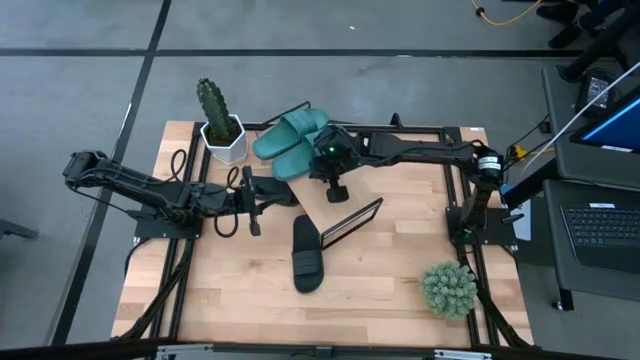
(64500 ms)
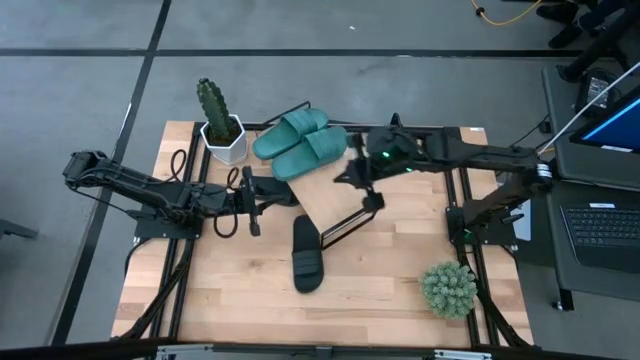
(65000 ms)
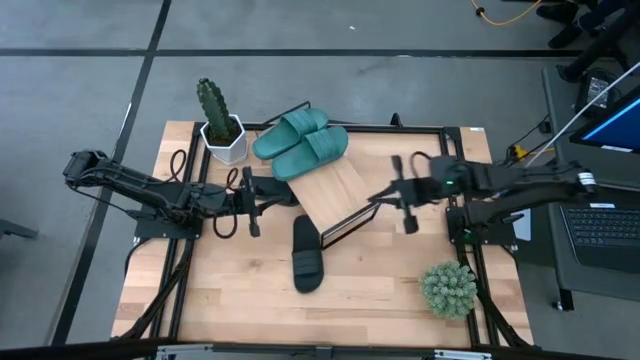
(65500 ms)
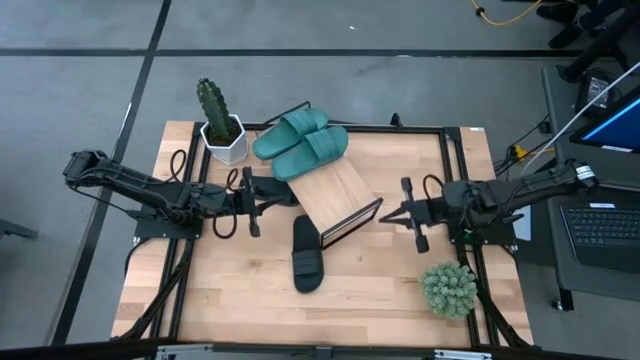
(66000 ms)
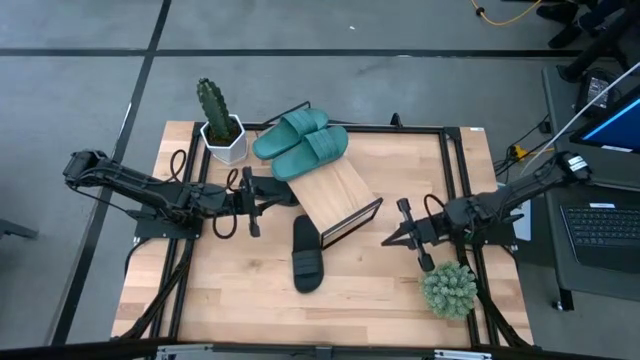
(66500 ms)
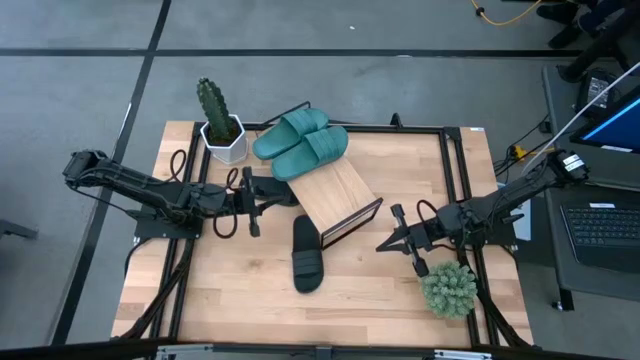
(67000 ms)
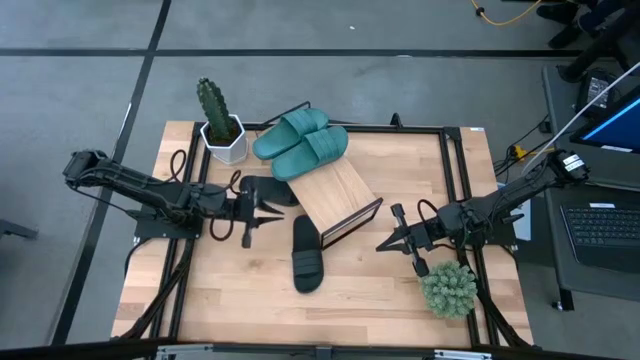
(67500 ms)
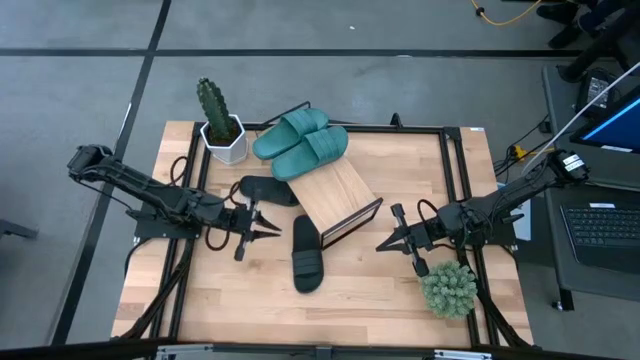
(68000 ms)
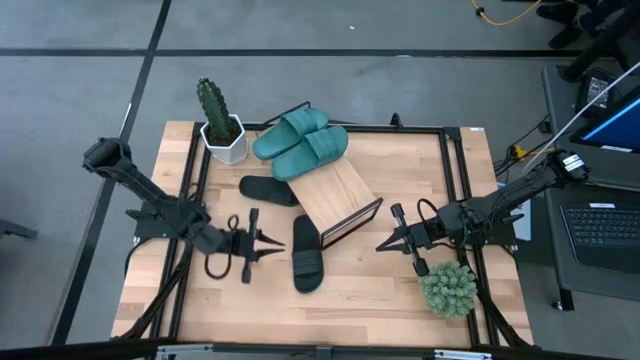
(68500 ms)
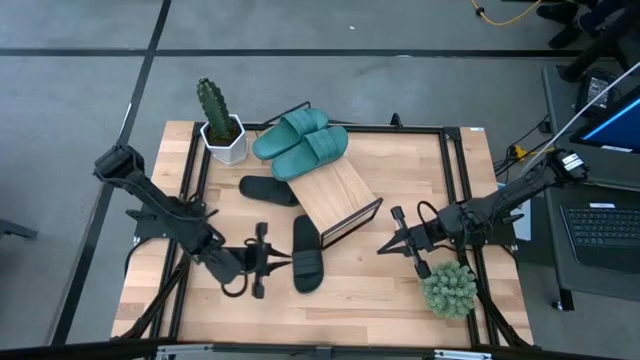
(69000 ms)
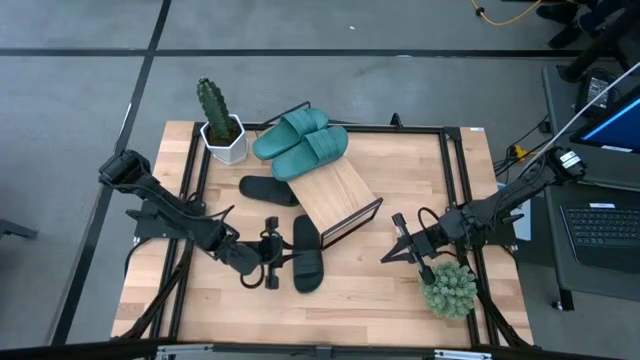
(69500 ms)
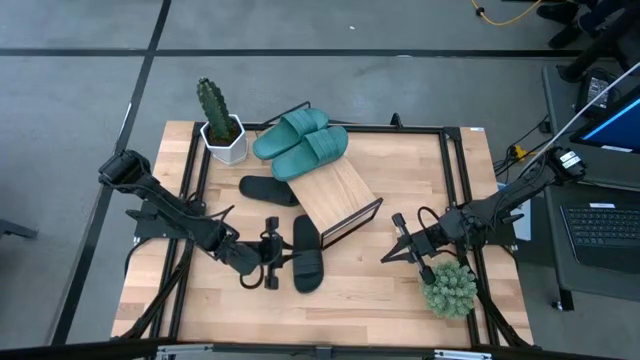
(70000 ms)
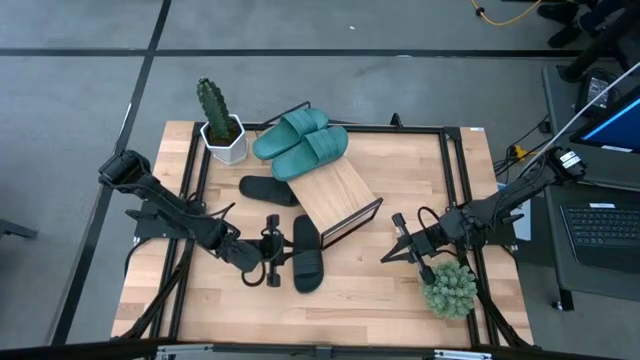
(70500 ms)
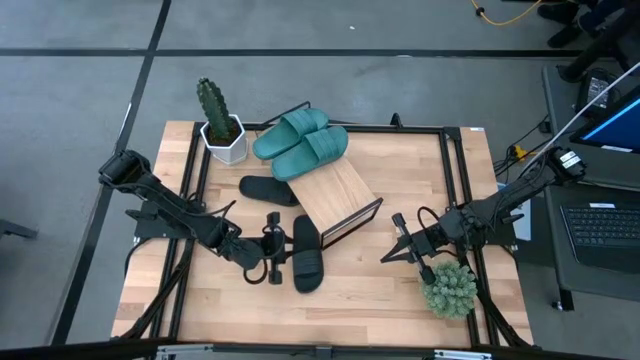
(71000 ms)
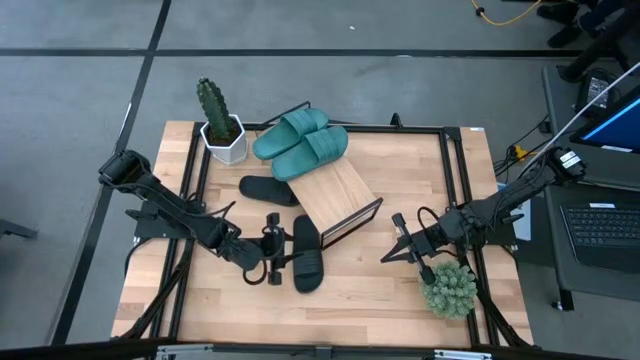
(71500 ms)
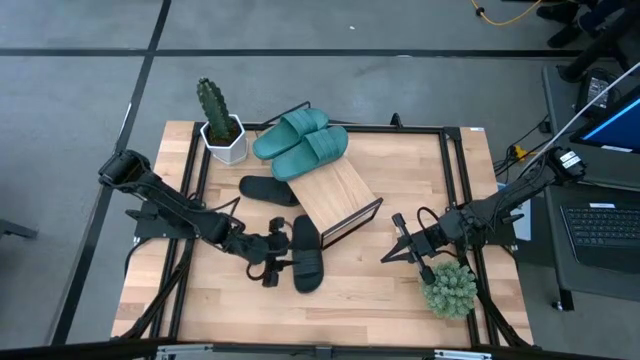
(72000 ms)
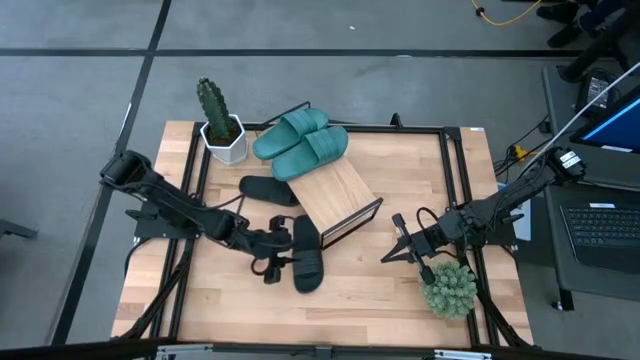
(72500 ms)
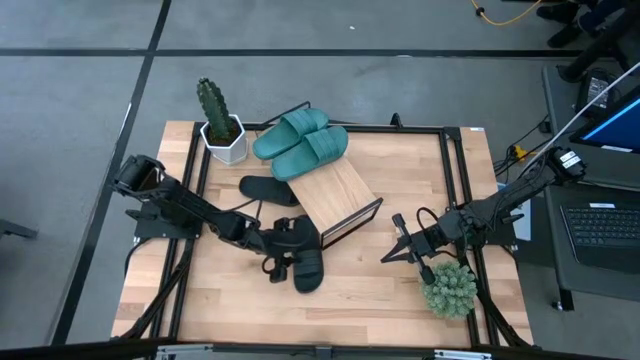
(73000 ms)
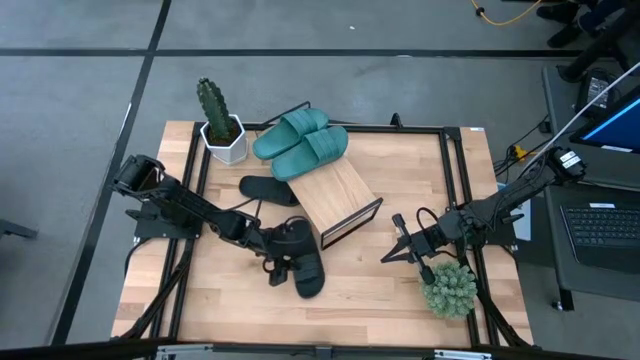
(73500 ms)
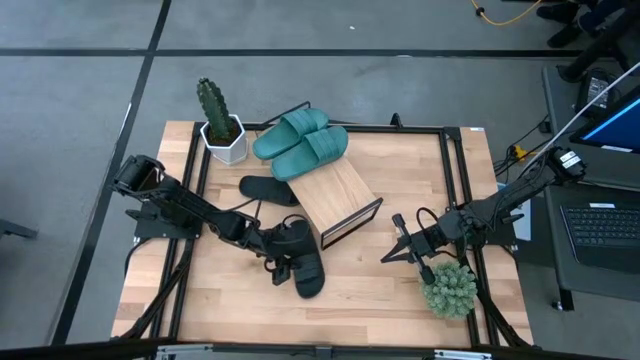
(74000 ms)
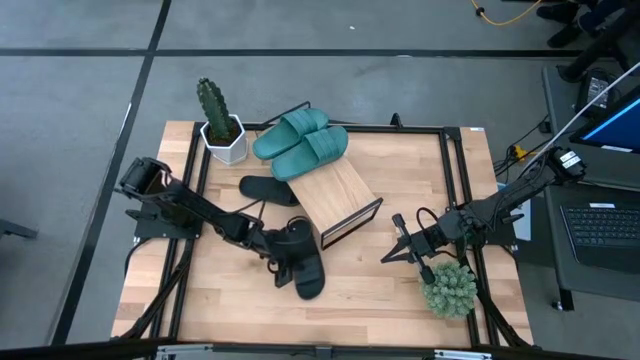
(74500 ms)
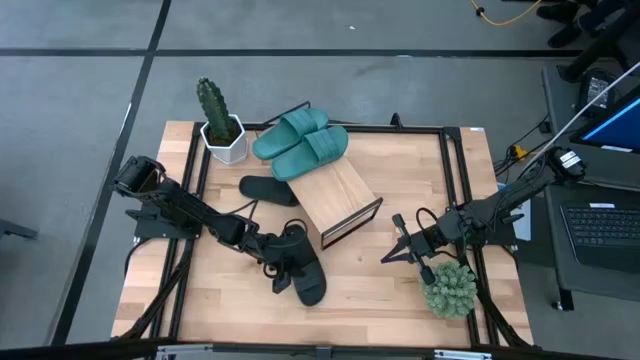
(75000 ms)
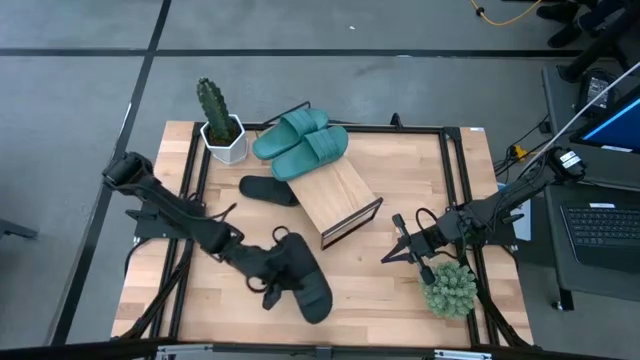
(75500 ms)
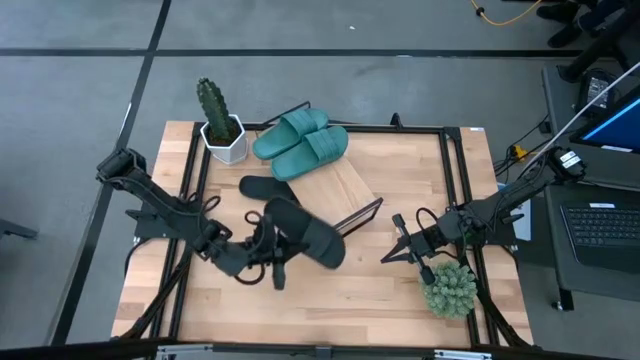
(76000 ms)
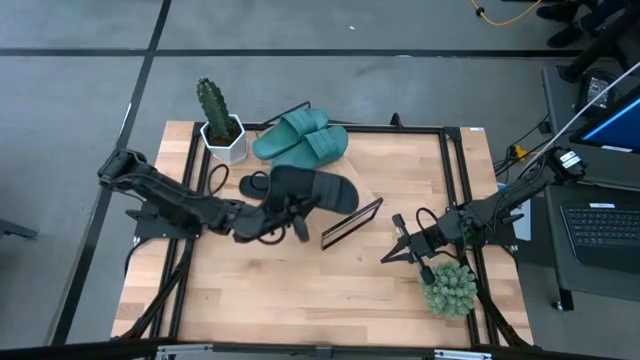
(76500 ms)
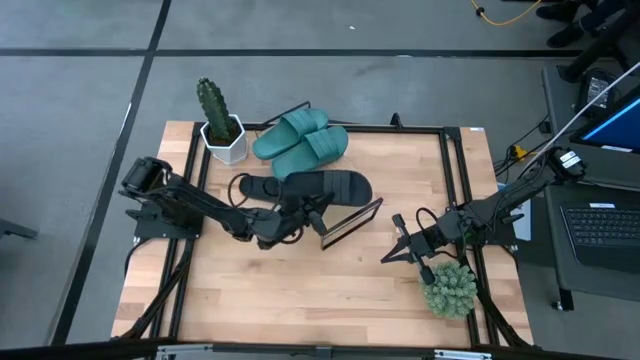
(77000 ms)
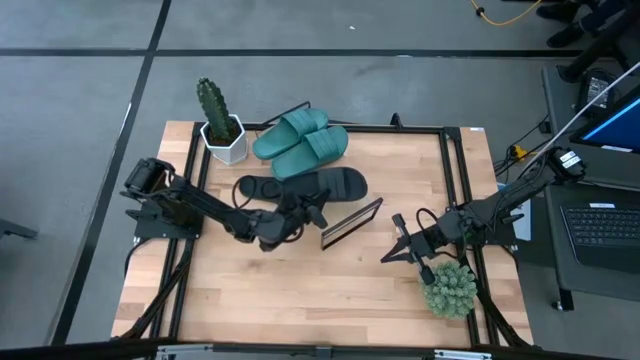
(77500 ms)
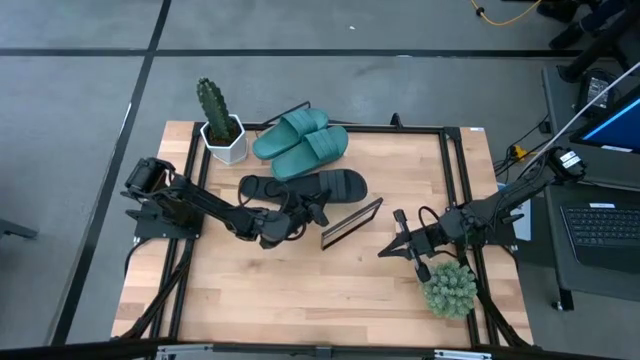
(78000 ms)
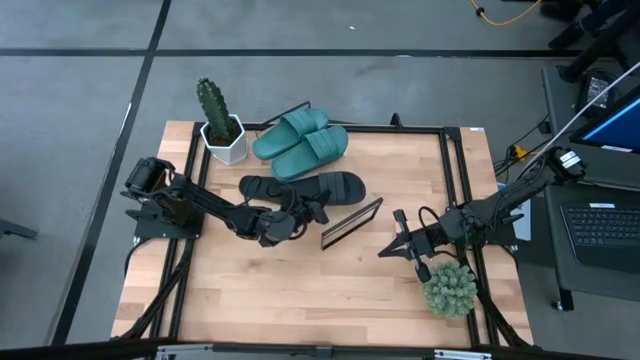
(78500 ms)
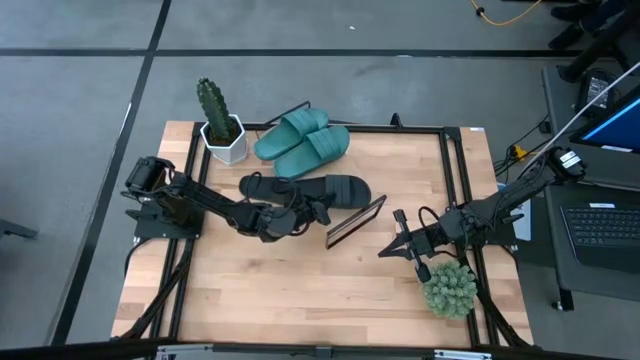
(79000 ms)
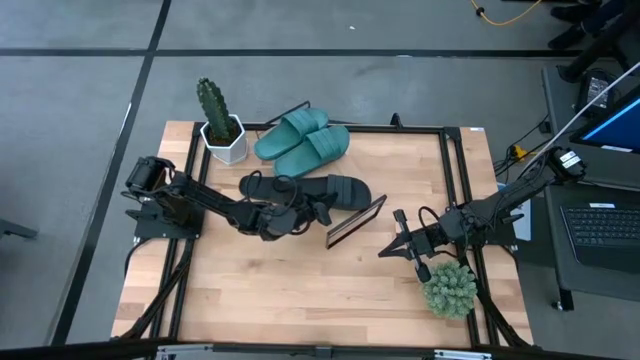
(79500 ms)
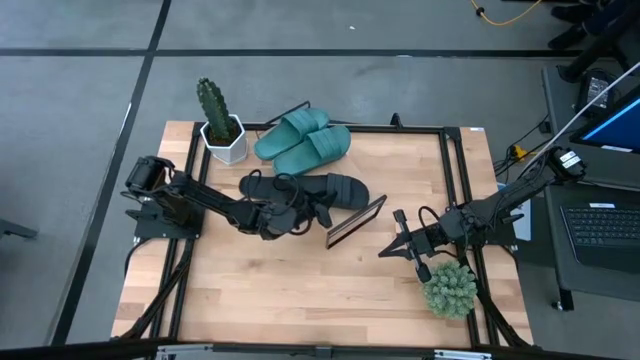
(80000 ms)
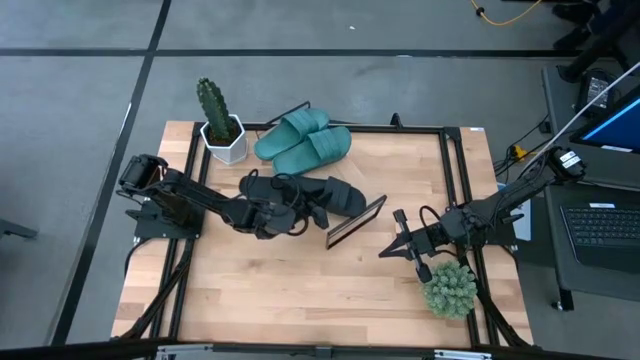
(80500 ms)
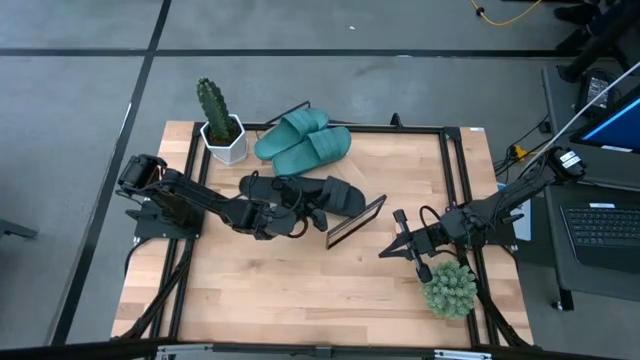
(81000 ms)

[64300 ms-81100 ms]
Task: Pick and place slides into the shelf
Put the bottom black slipper onto the shelf

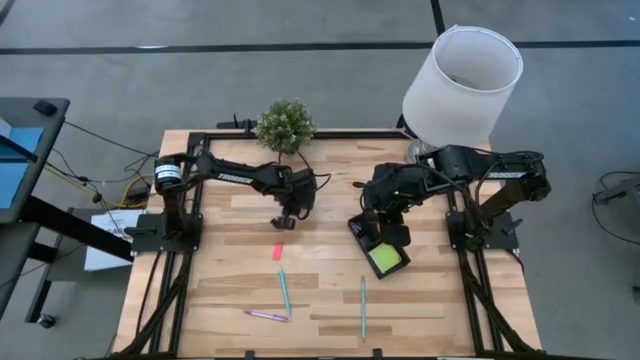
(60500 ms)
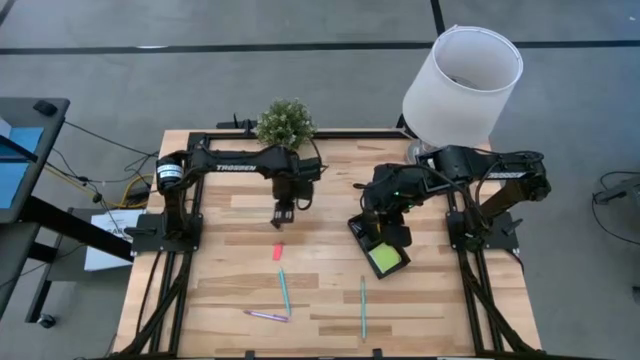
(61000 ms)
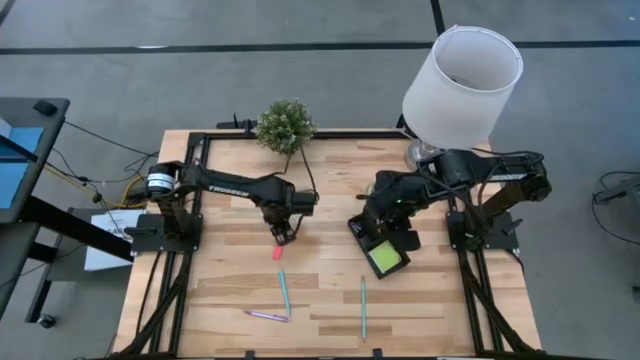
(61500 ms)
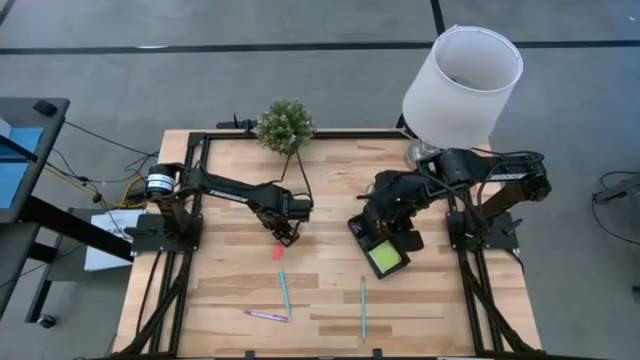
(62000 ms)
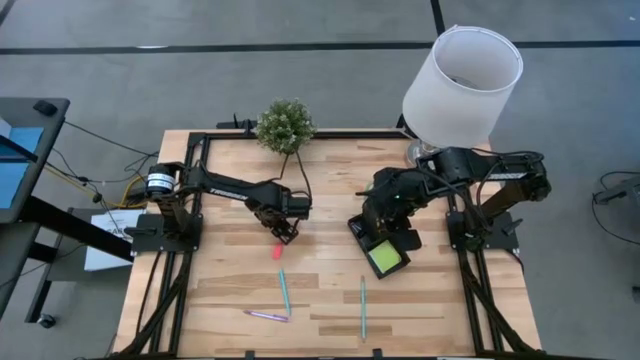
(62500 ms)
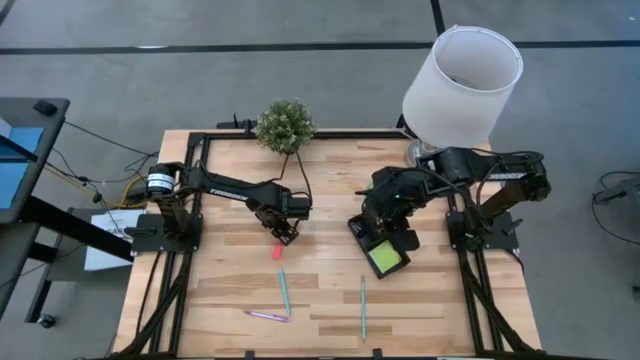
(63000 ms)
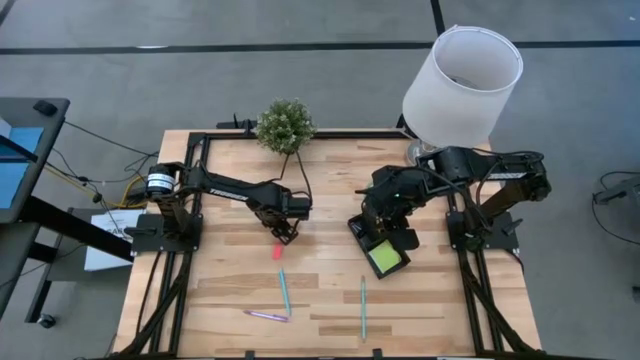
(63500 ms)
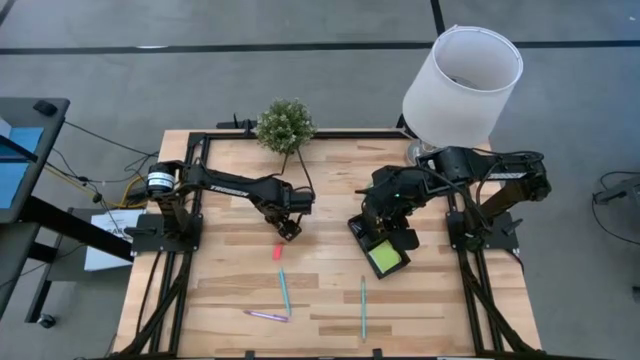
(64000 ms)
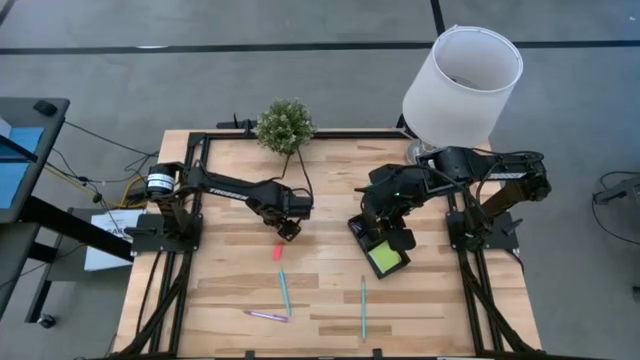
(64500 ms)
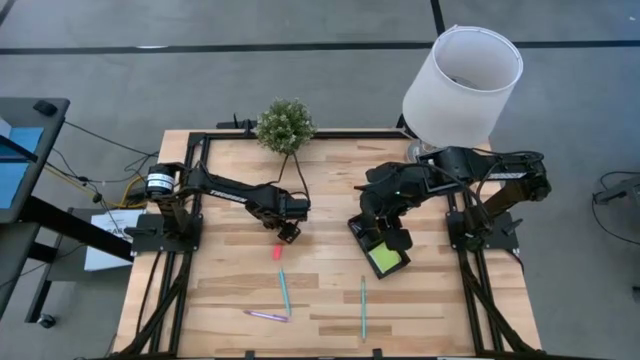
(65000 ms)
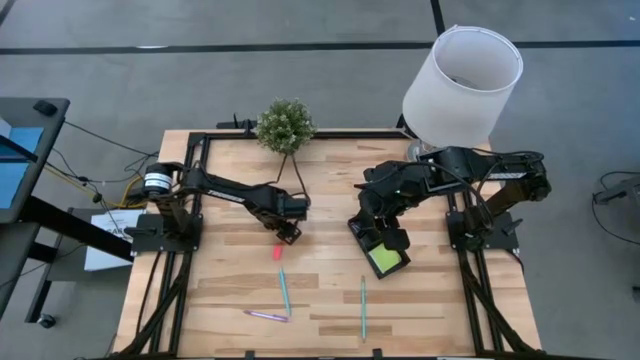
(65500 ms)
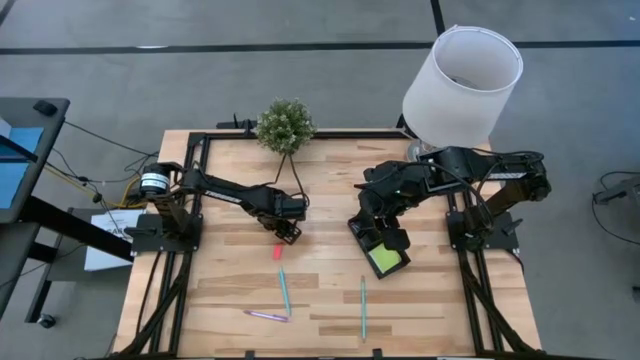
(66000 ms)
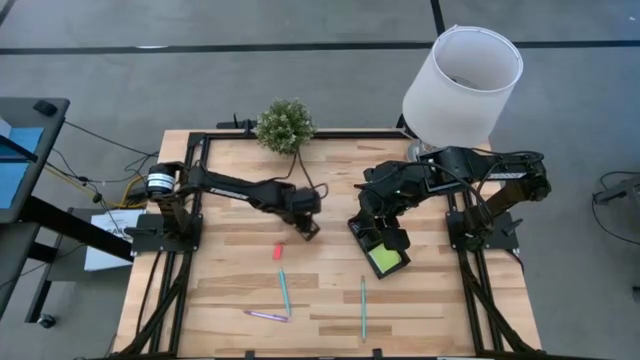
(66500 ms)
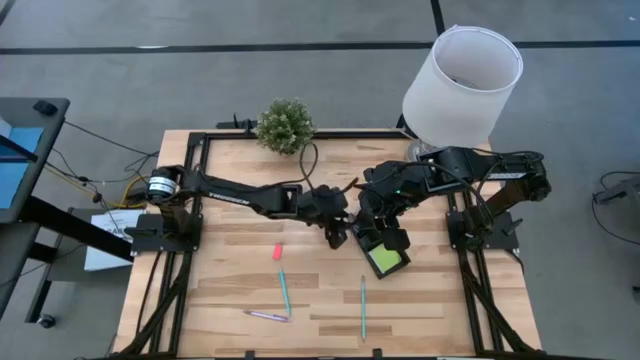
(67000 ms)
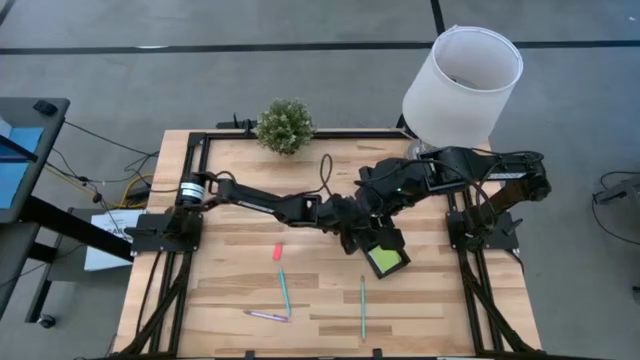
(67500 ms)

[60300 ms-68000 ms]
Task: Pick and place office supplies into organizer
Put the black binder clip into the black desk organizer
